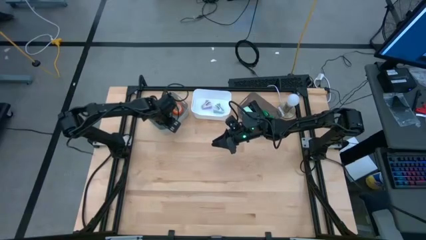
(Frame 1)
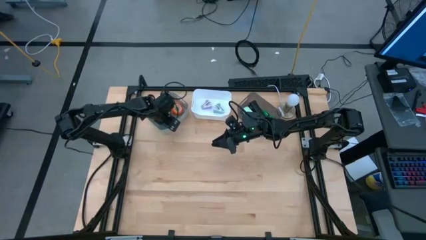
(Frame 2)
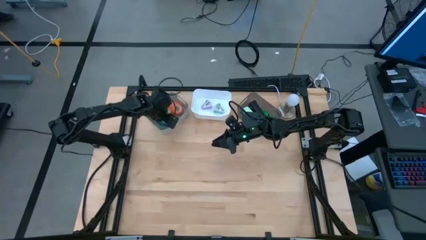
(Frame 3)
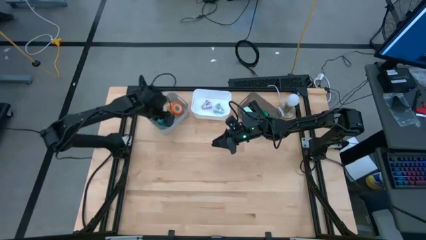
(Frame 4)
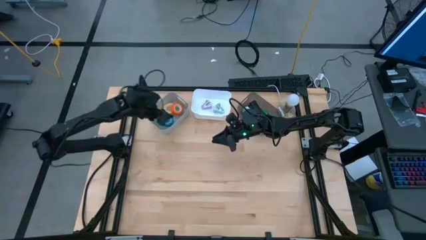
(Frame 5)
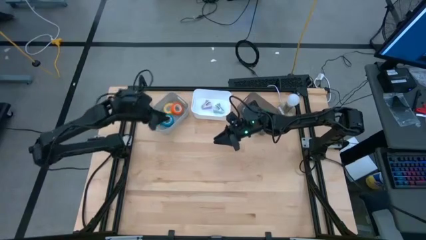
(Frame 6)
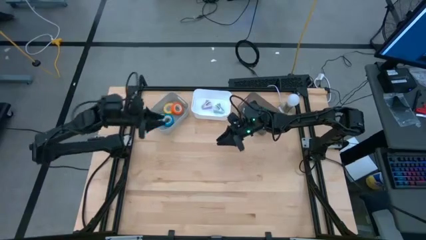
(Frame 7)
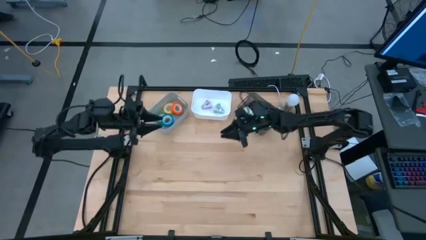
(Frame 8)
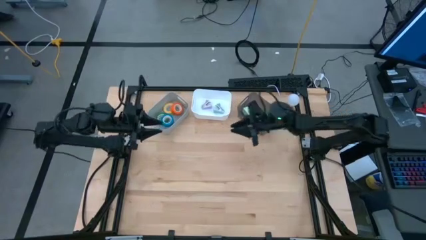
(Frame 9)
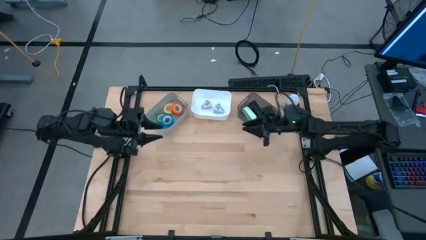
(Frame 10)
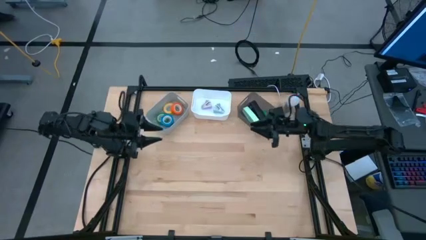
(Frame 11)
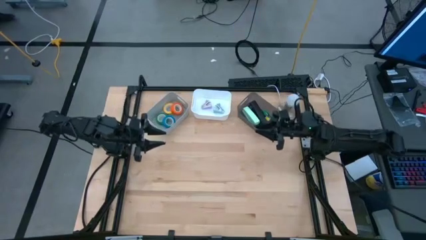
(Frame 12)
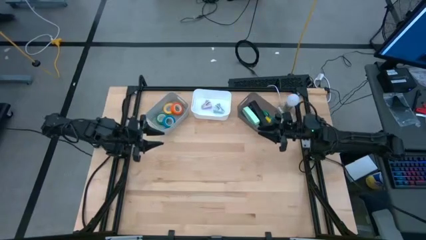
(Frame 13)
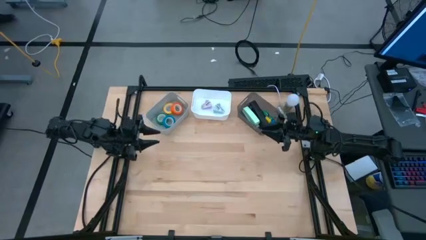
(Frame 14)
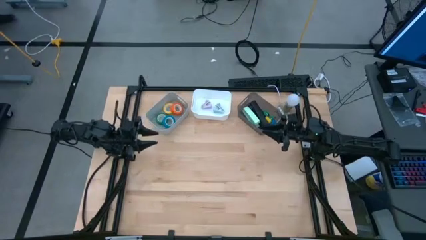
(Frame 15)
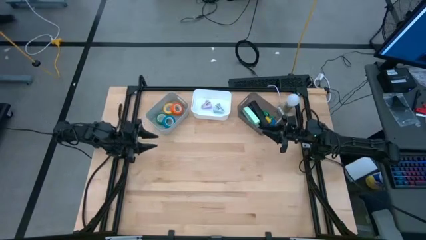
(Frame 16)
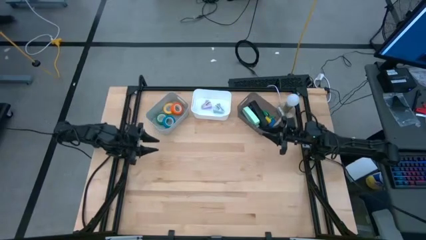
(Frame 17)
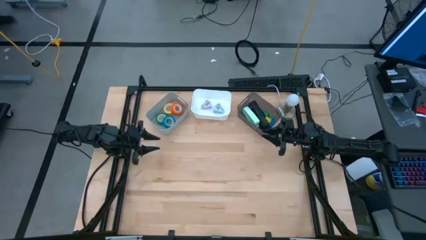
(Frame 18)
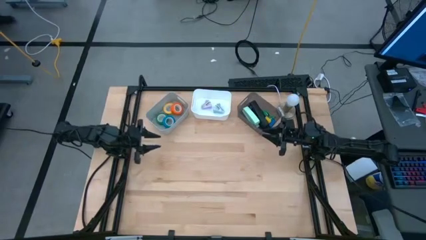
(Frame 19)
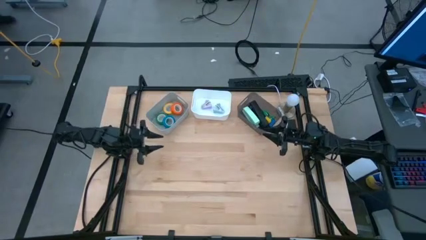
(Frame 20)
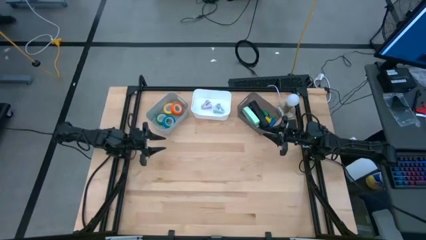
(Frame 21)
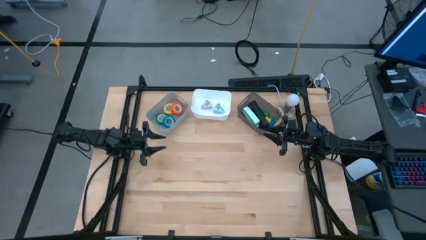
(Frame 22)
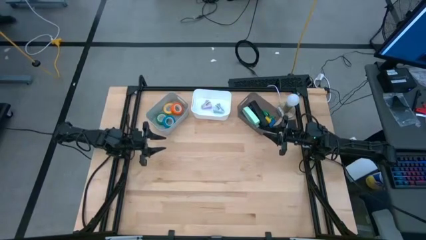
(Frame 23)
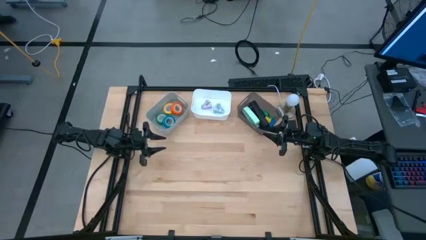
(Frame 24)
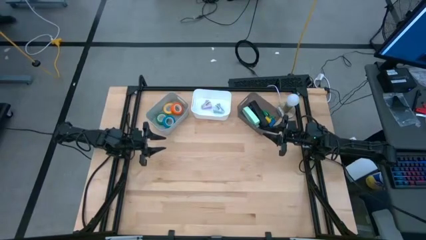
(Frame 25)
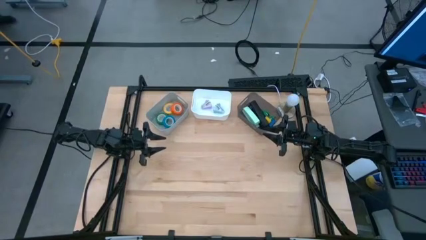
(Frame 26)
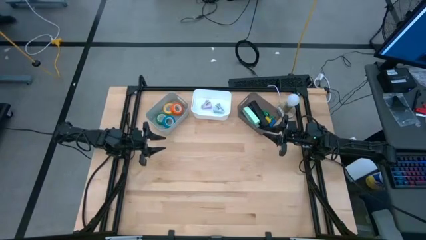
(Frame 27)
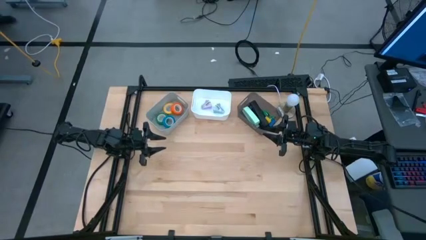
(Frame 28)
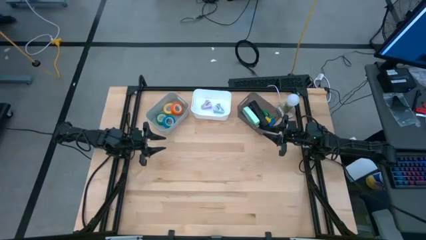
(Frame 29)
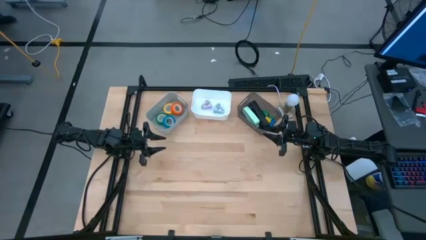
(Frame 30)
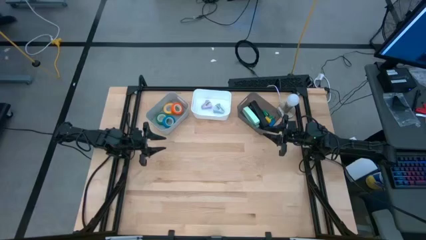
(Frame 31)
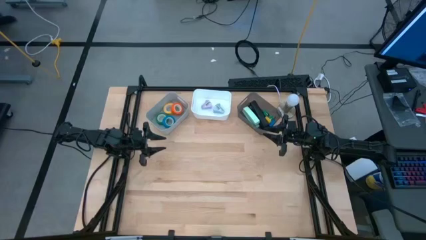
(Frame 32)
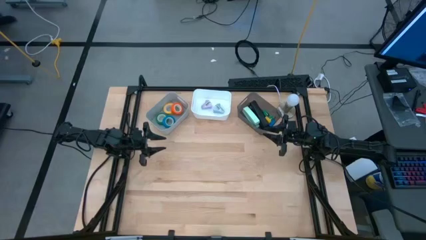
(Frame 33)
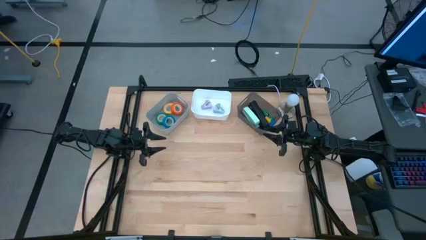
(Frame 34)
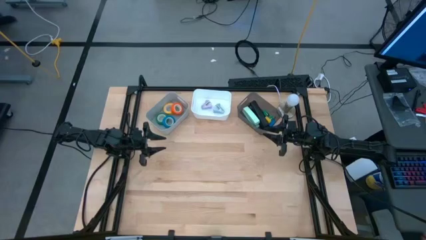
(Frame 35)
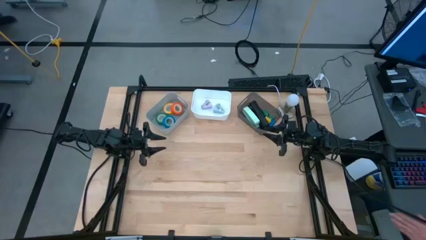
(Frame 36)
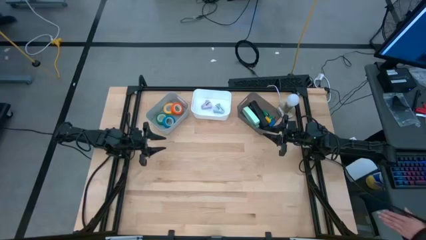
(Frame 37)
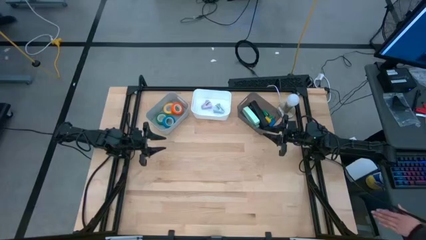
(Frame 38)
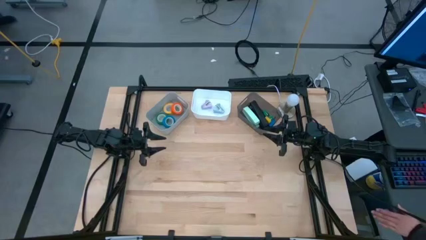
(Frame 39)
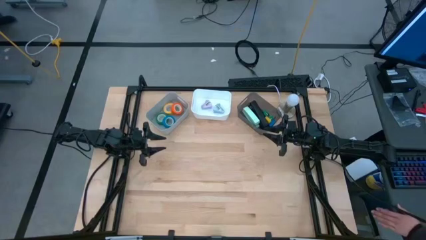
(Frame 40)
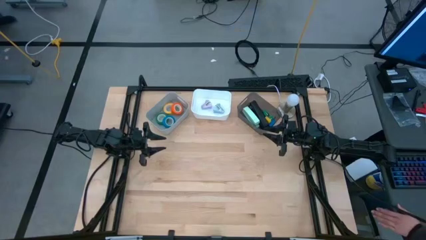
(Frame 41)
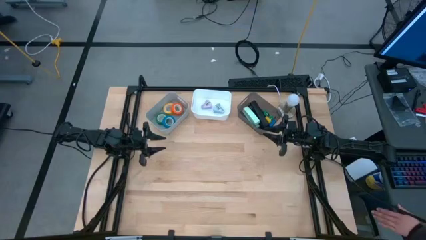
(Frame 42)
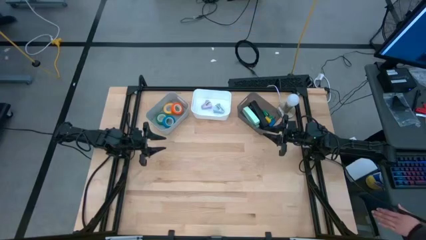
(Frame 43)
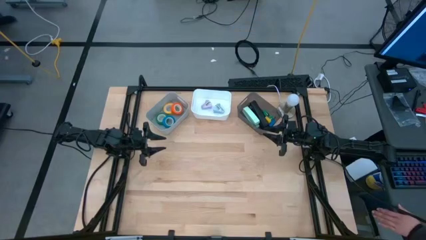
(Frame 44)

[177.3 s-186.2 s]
Task: Pick and place Stapler, Stapler remover, tape
Return to Home Position

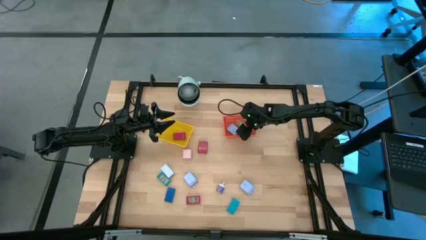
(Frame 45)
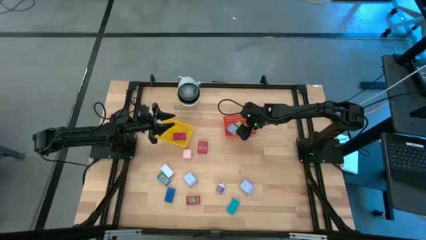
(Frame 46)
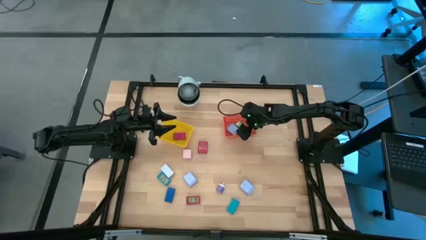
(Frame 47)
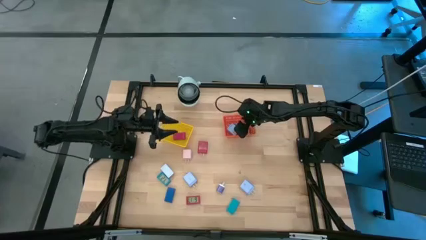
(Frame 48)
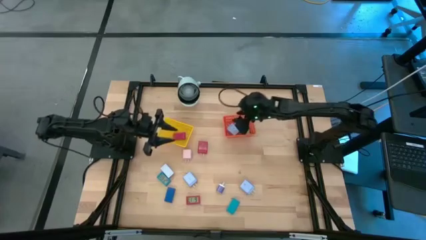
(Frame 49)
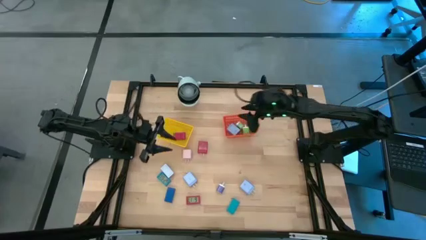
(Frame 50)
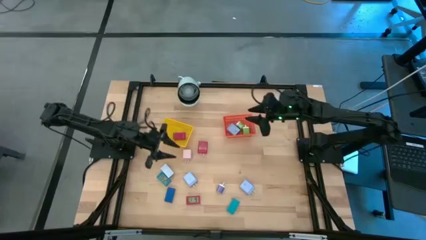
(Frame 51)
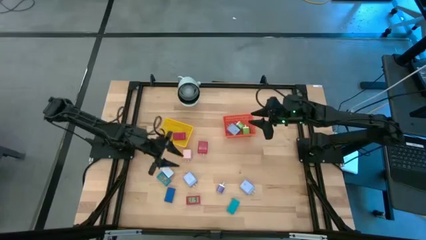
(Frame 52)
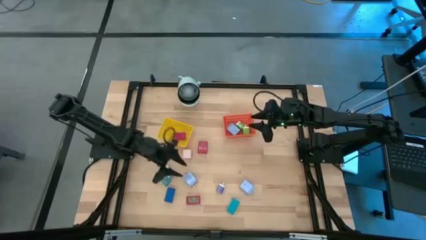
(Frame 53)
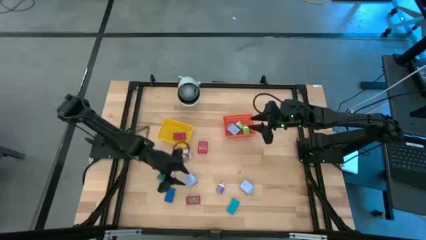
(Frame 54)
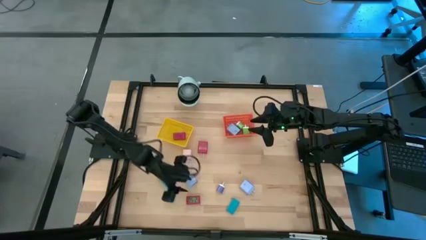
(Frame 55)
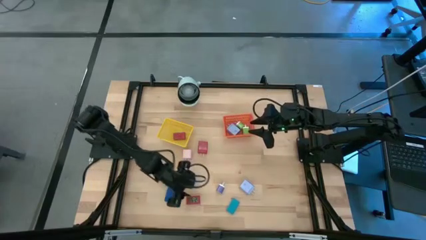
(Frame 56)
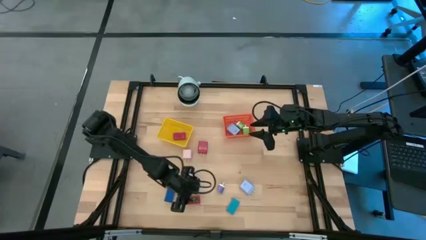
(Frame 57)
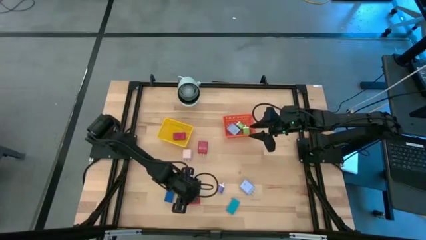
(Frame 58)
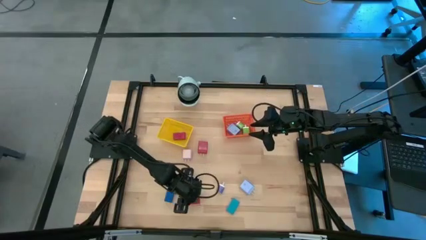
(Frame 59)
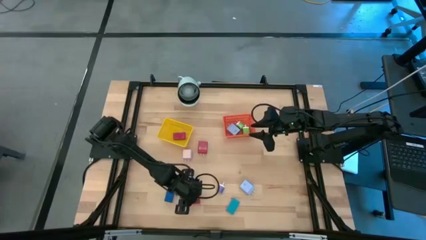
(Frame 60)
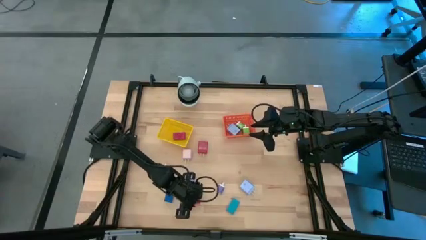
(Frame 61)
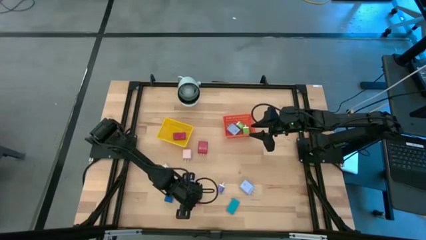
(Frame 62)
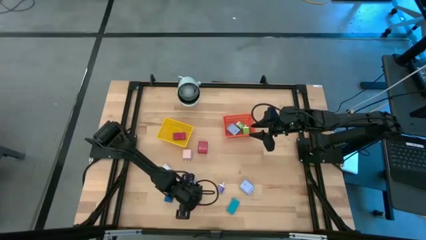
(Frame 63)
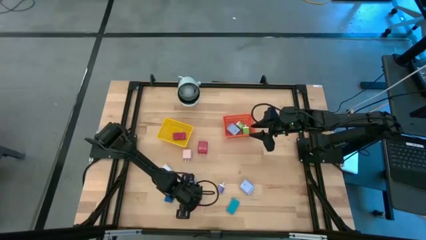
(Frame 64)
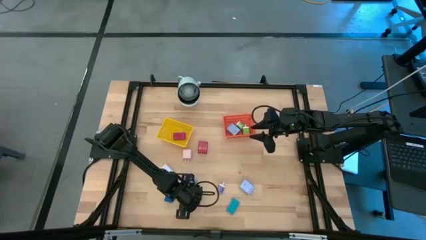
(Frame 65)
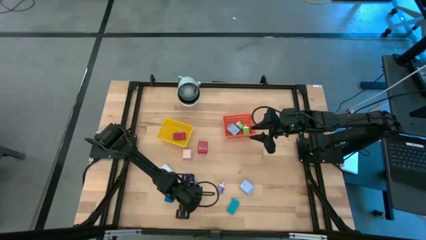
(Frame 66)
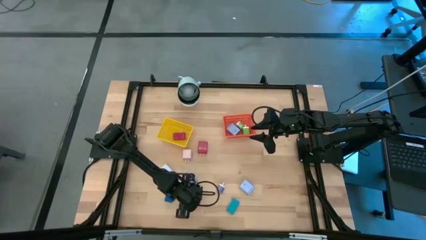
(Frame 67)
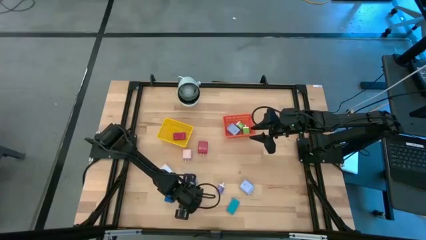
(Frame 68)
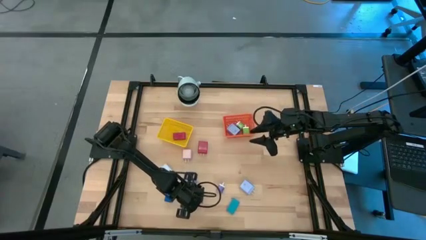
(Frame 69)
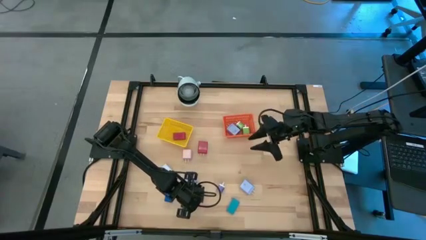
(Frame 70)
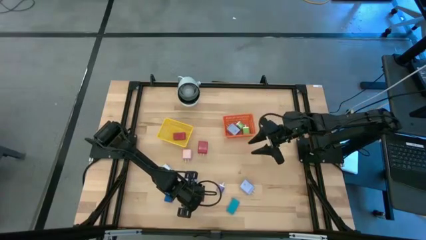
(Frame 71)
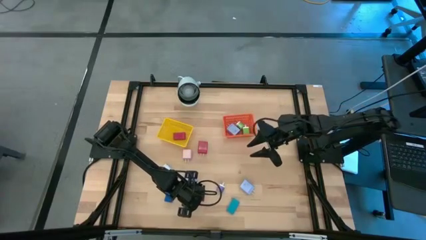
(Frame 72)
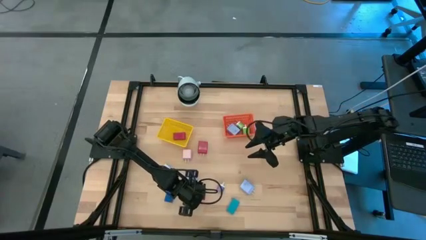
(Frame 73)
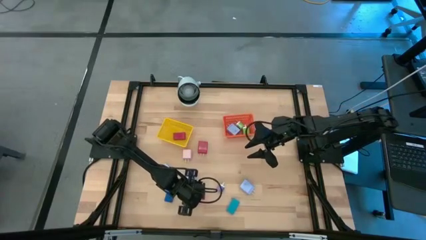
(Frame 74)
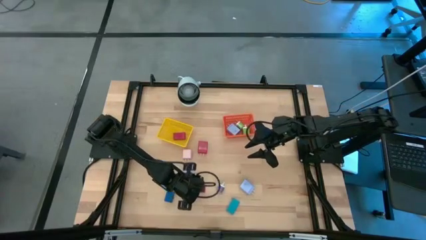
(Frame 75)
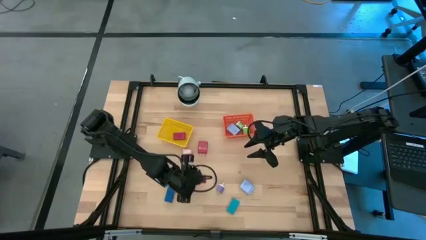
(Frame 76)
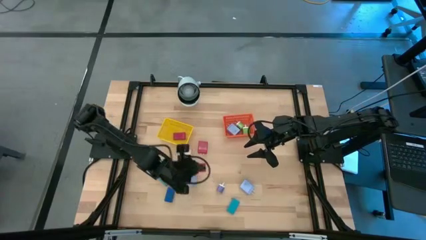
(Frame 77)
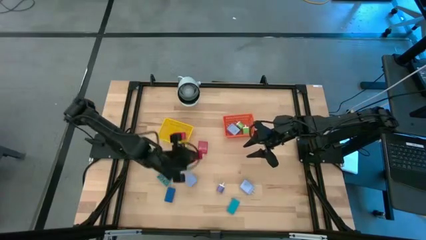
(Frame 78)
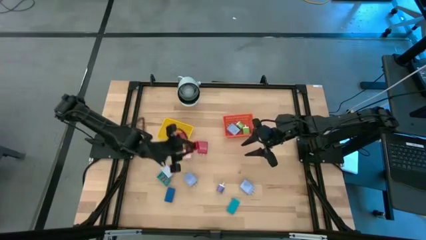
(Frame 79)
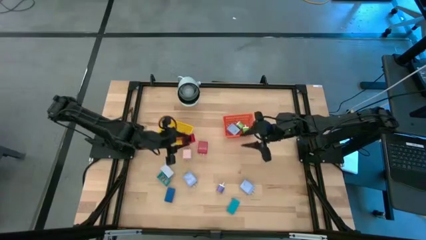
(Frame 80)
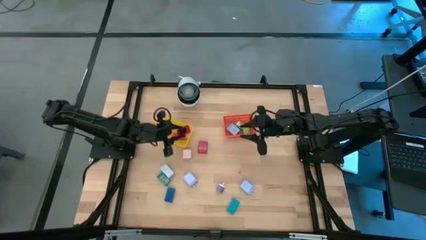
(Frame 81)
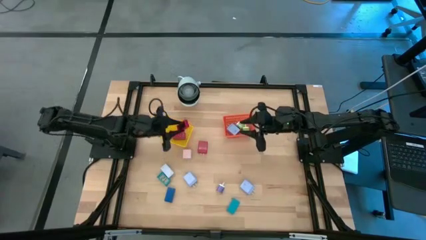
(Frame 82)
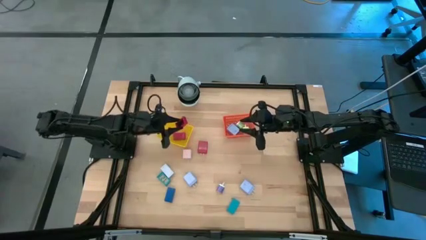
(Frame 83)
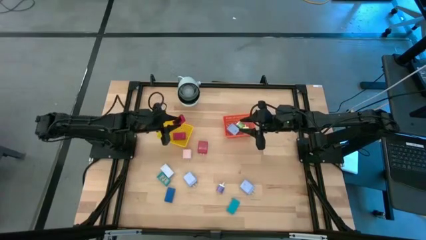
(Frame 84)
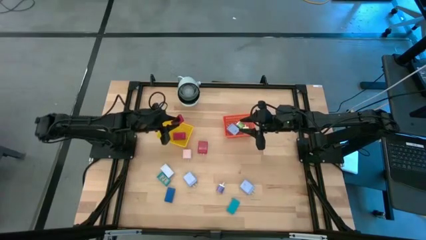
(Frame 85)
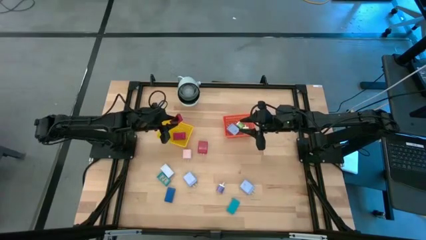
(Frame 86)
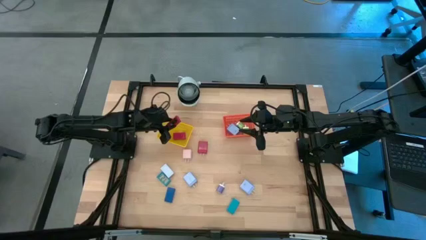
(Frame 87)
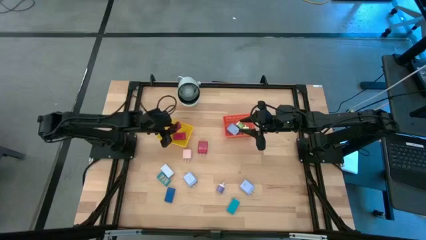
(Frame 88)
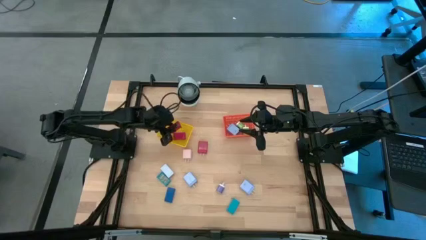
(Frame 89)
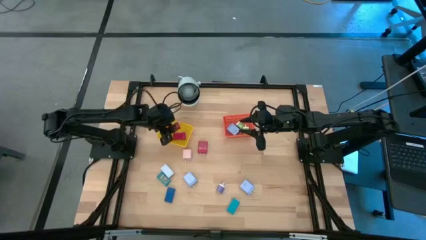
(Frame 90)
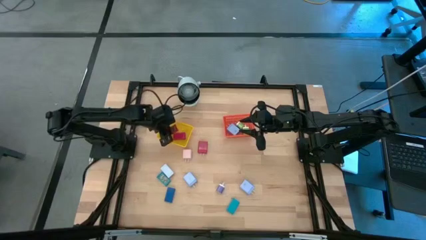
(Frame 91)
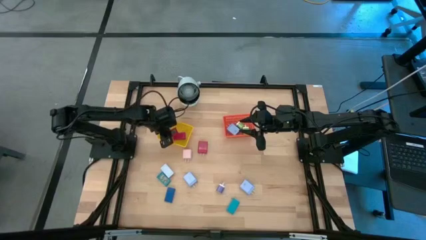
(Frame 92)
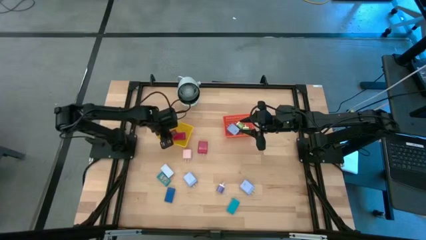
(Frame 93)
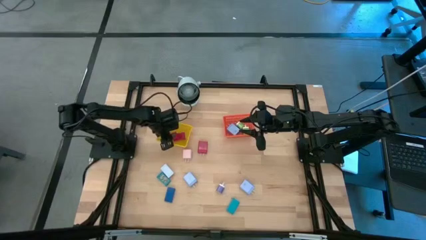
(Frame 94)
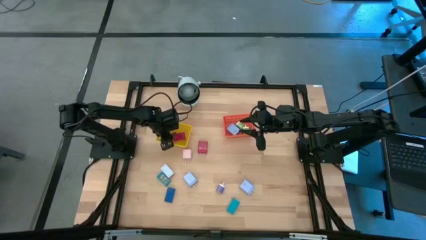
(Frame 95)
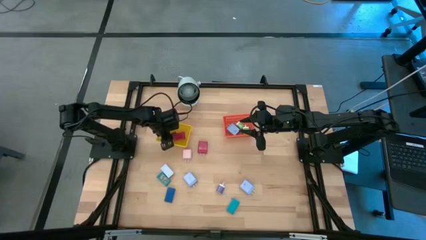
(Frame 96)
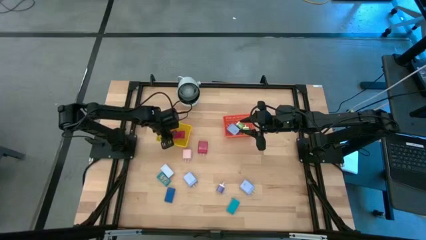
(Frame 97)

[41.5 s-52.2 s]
Task: Pick & Place Office items
Put the red digital timer into the yellow bin
